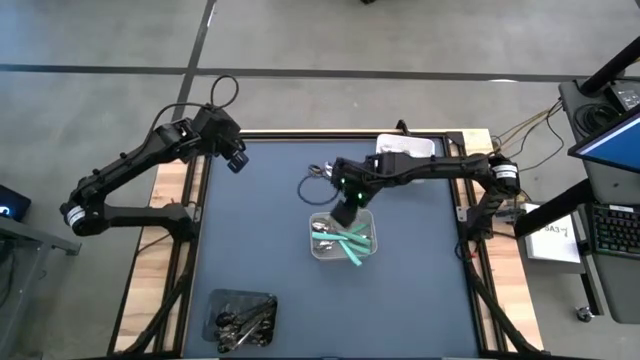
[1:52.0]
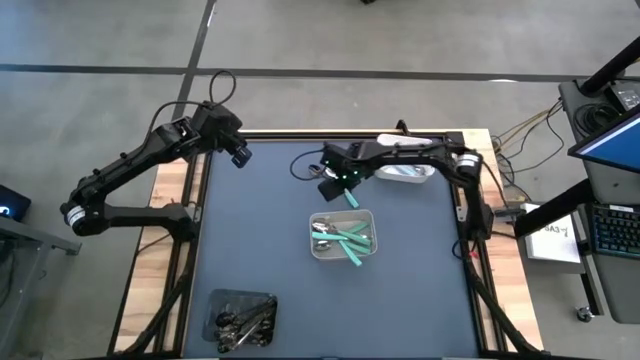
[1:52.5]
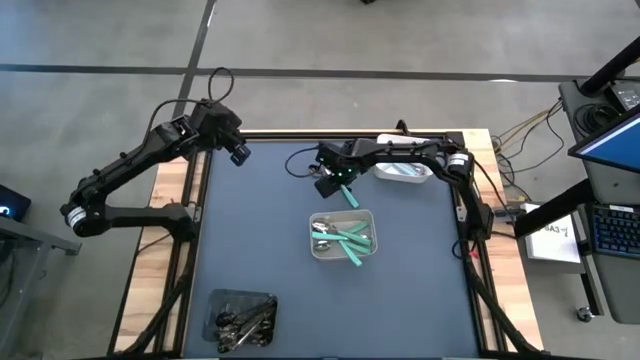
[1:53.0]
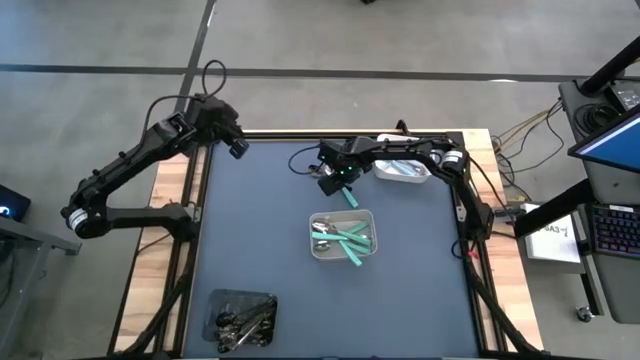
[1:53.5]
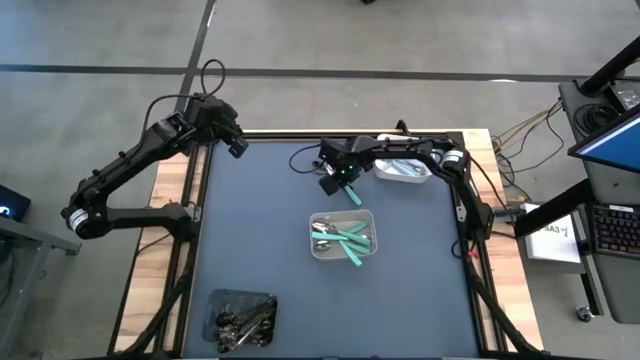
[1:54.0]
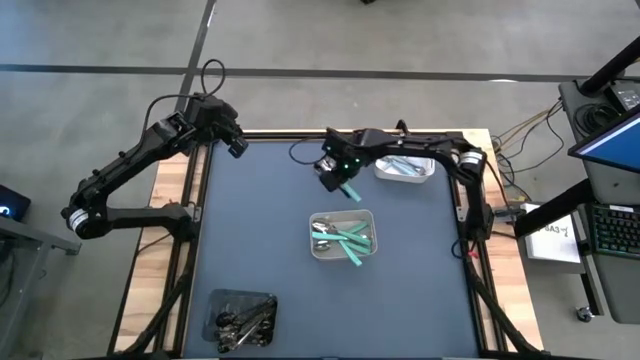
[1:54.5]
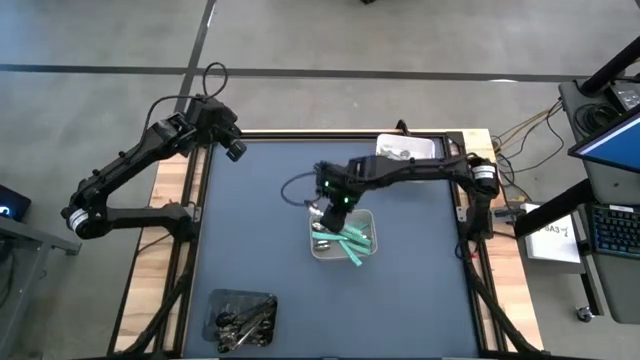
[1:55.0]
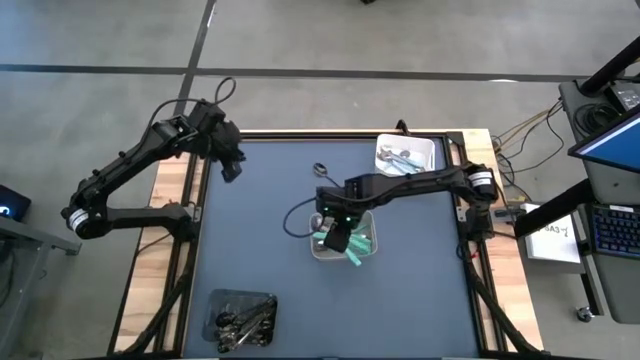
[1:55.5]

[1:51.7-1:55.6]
Task: Sort silverware by color (type)
Put the green spoon into the gray bin

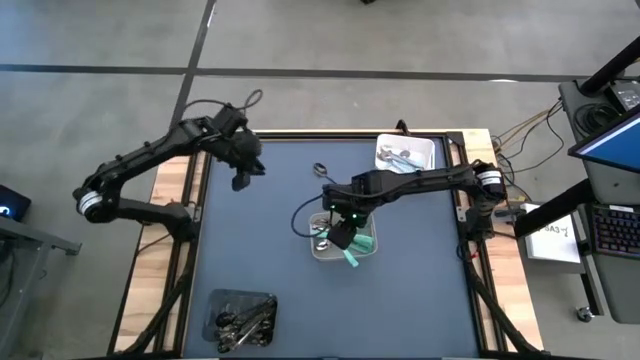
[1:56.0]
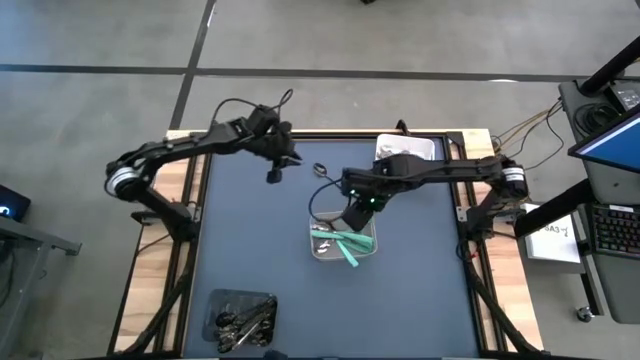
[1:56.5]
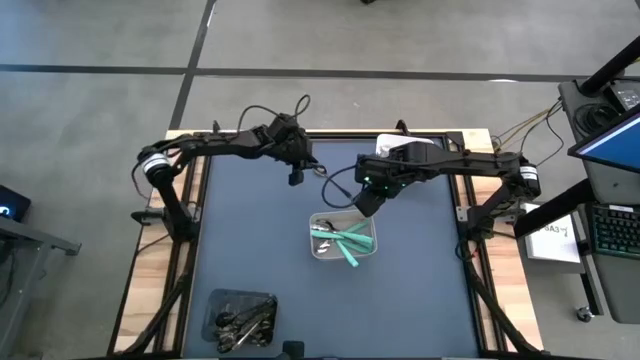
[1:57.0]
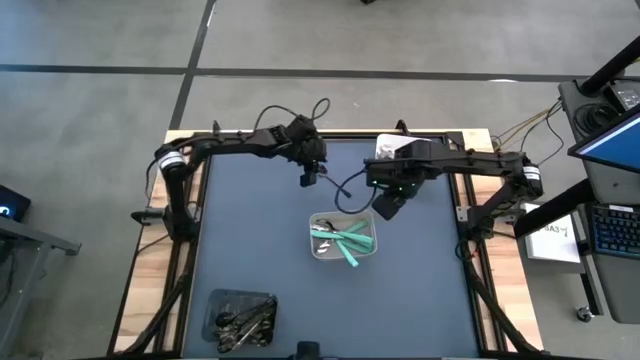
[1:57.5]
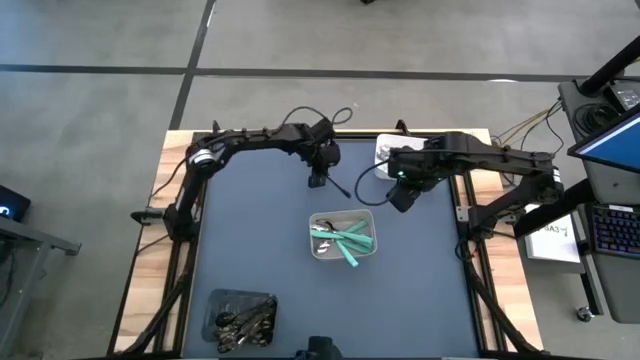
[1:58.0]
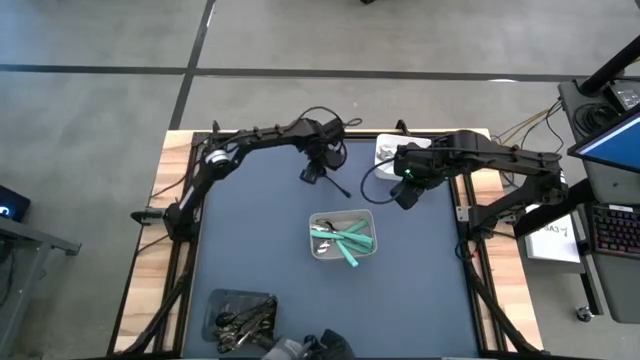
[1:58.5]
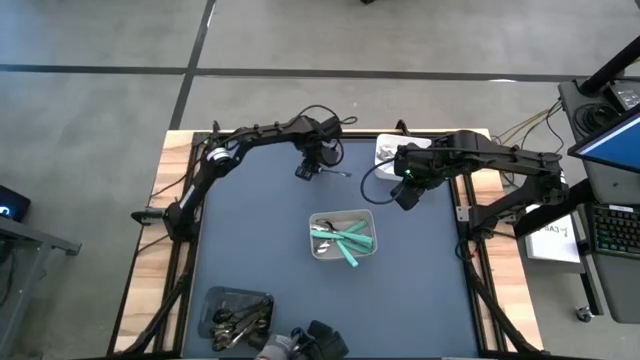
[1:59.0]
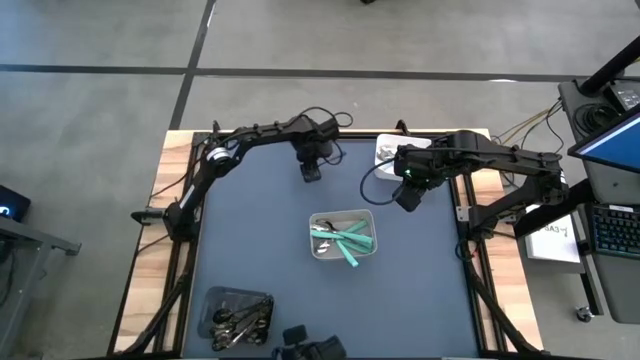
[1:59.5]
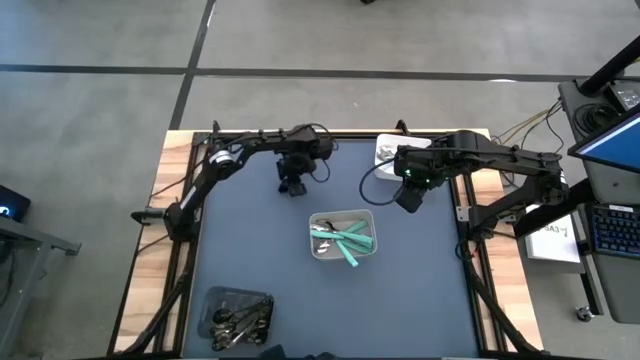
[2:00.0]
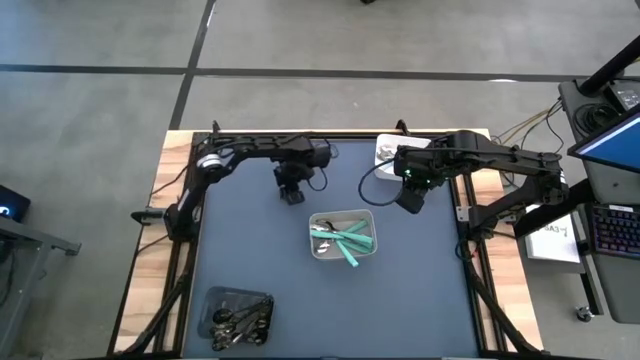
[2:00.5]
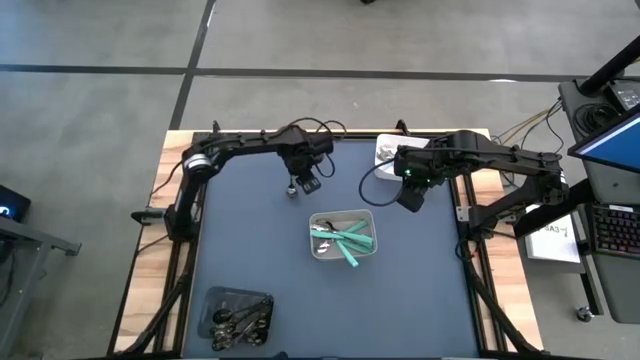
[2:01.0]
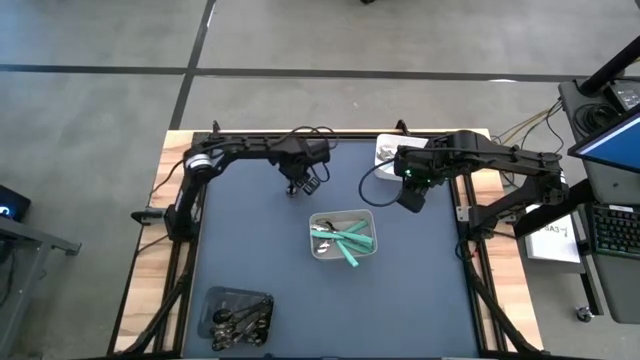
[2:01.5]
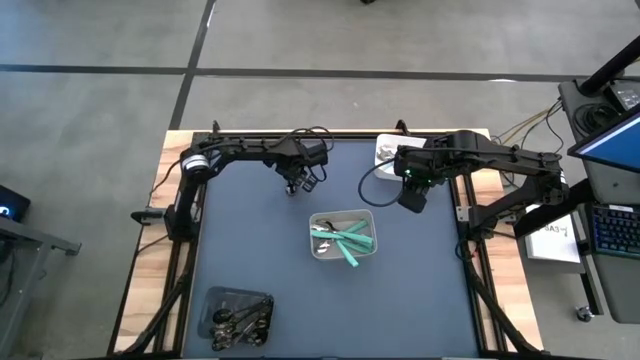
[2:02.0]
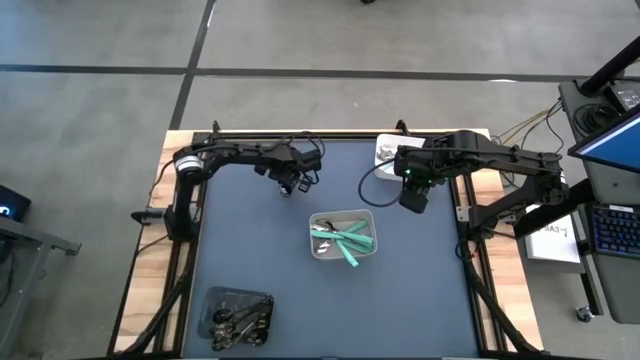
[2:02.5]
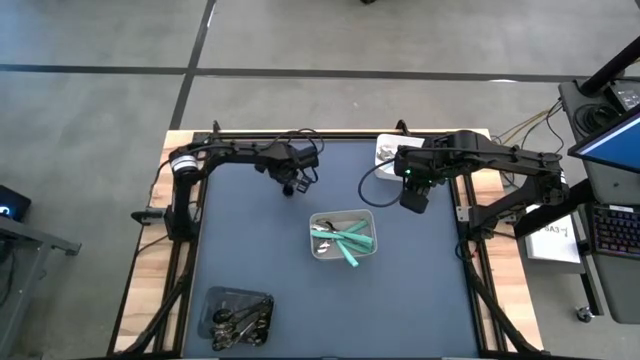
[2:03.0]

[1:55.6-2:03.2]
Put the black spoon into the black bin

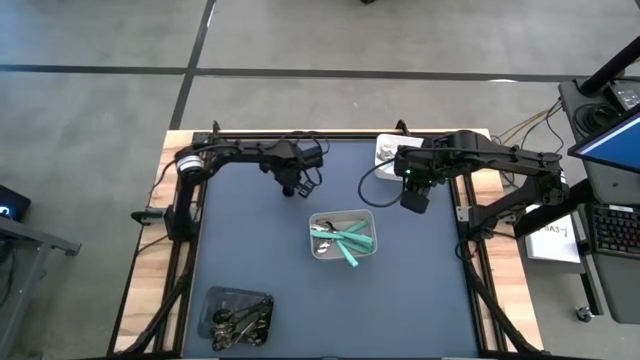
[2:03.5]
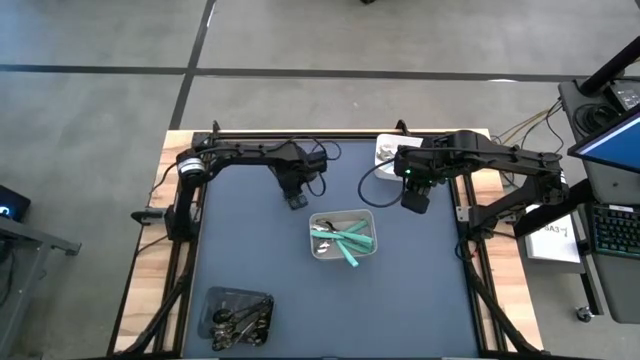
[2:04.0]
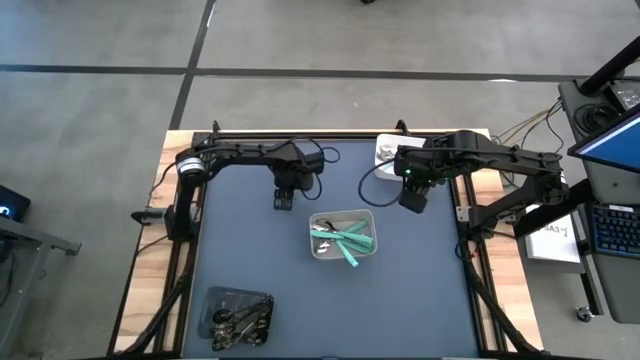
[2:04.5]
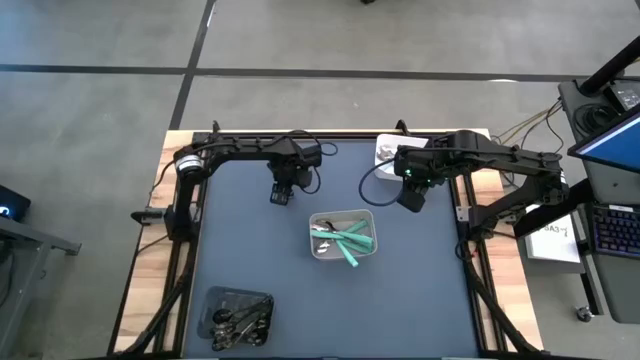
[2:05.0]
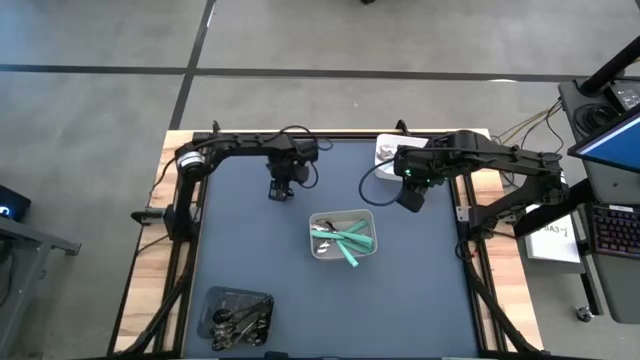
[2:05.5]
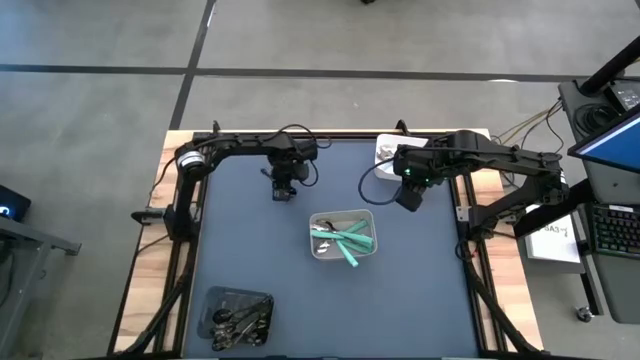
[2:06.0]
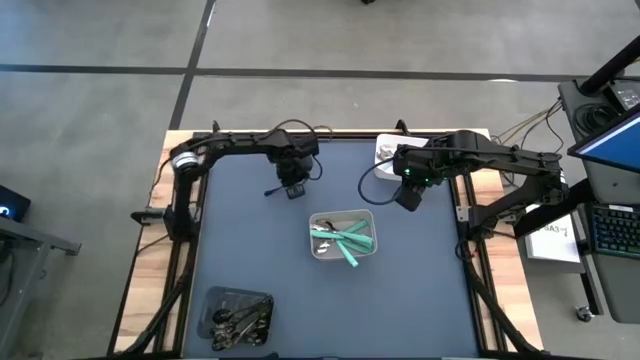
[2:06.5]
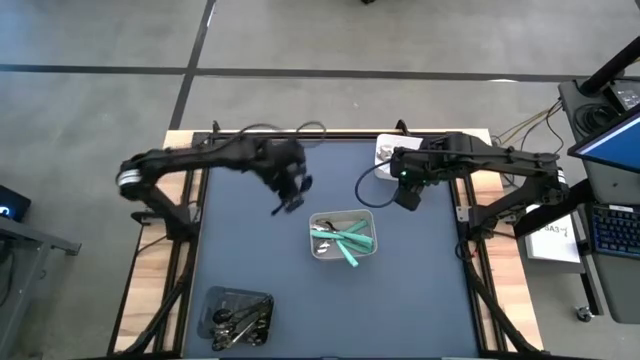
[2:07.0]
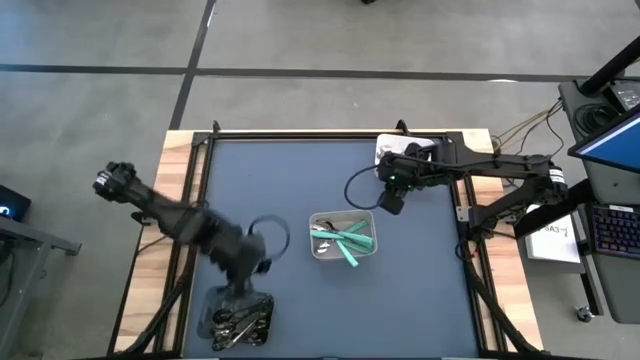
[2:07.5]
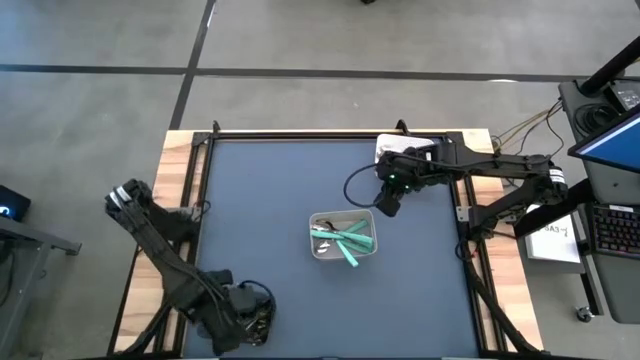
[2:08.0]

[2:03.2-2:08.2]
Put the black spoon into the black bin

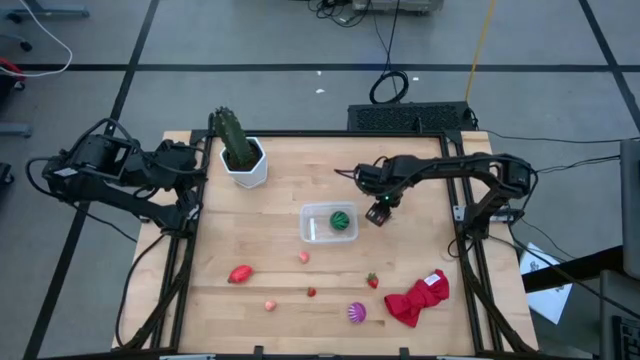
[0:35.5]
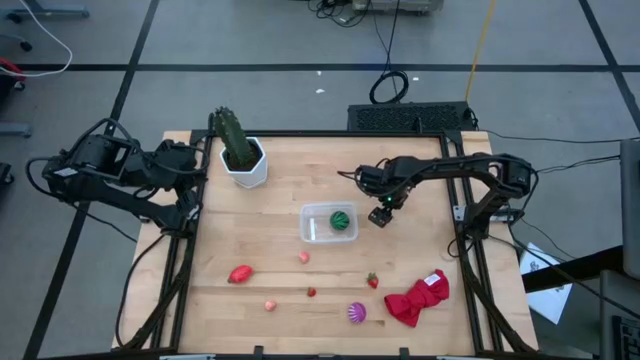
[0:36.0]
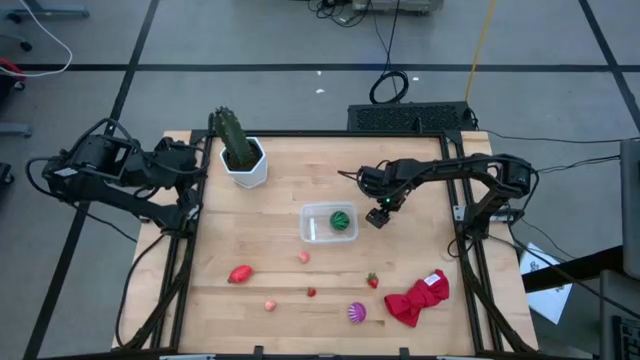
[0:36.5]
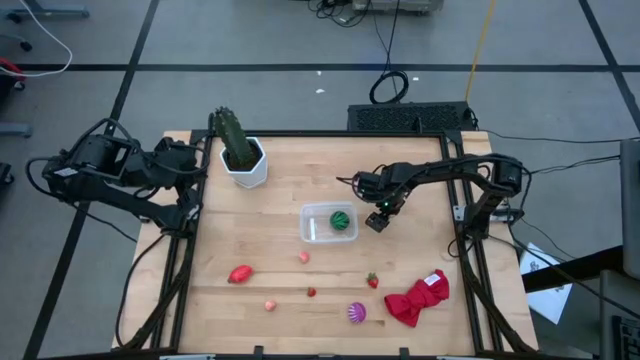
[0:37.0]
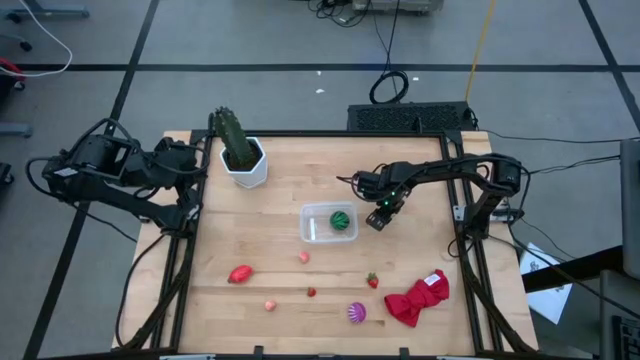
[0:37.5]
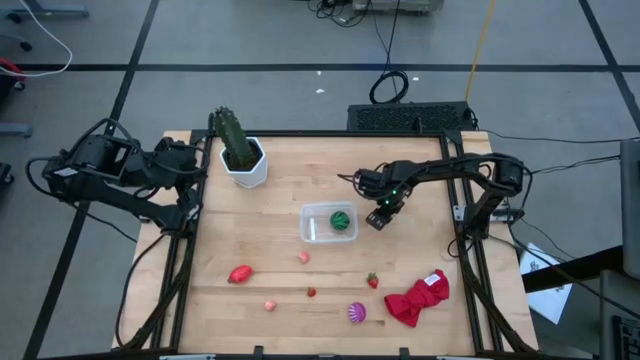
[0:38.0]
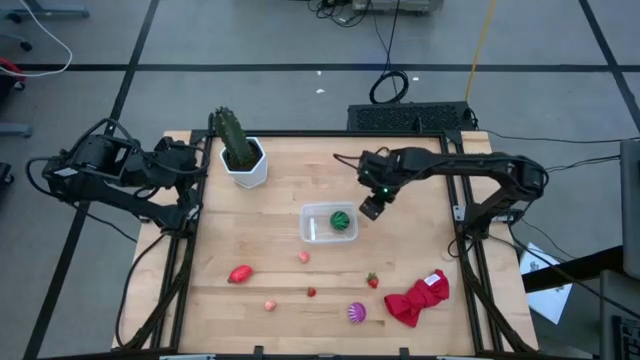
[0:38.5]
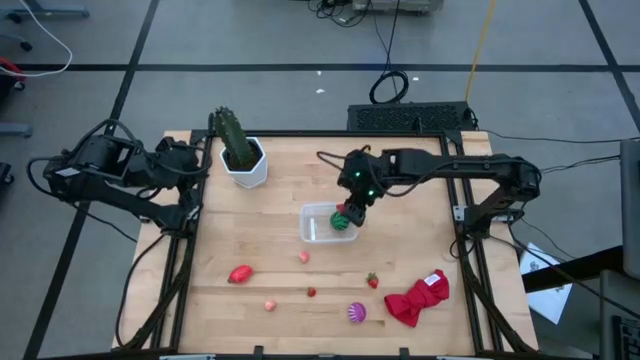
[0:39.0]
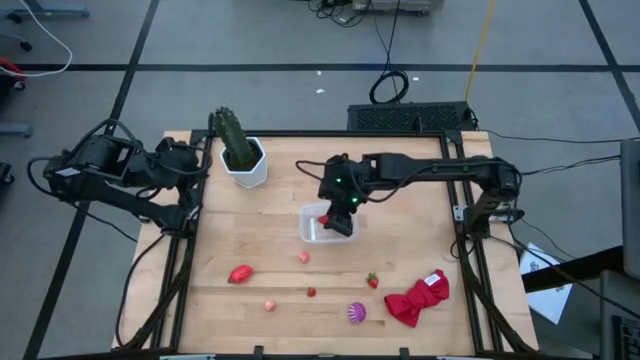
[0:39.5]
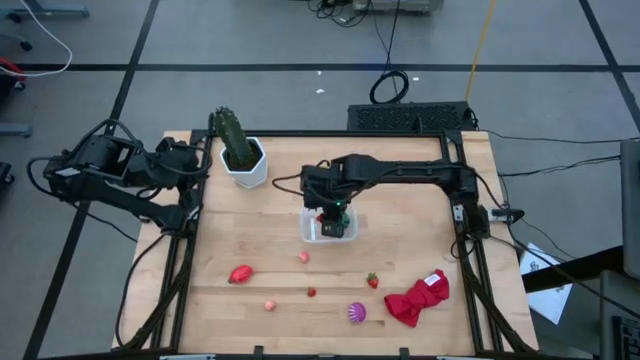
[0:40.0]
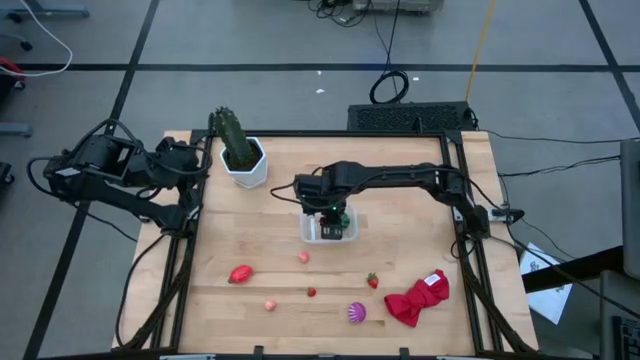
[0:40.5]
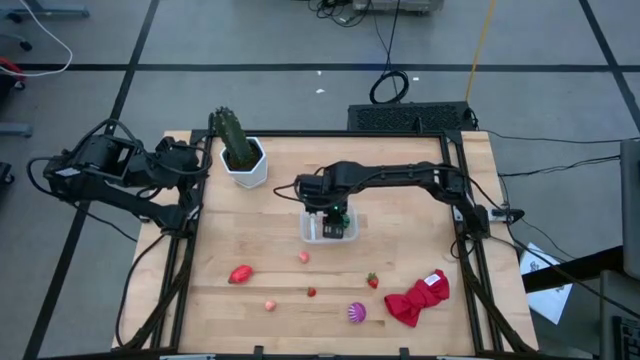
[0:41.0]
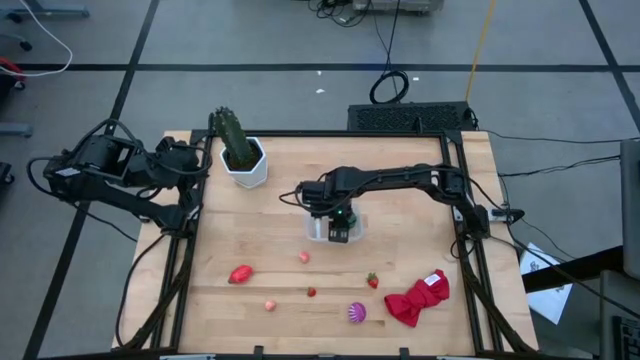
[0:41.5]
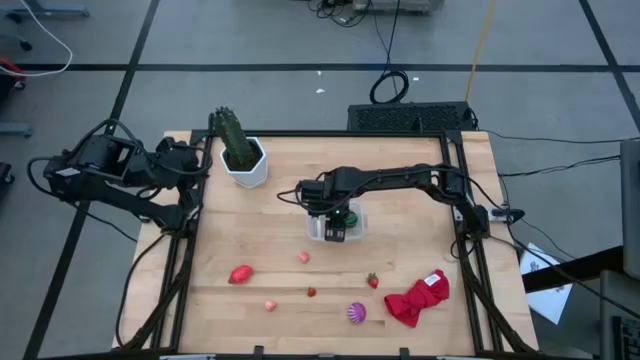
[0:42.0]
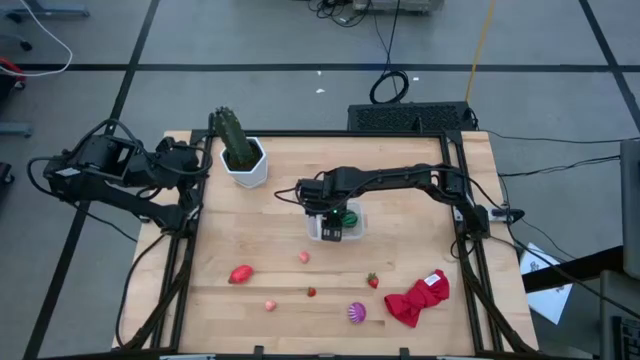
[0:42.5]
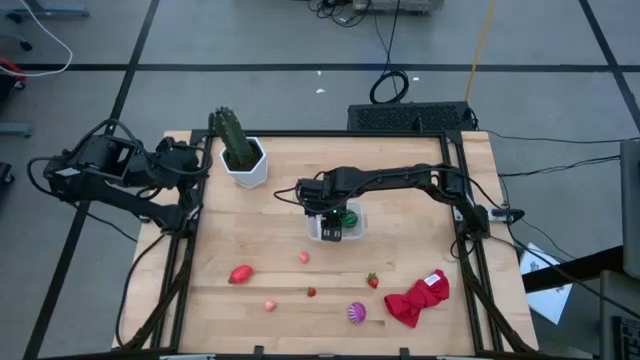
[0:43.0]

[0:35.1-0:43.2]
Task: Pick and placing Produce into tupperware
Put the top strawberry into the transparent bin
